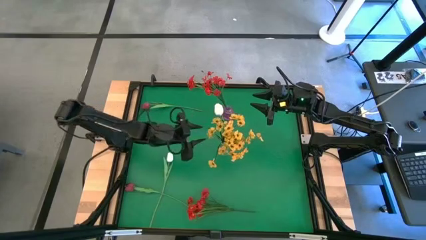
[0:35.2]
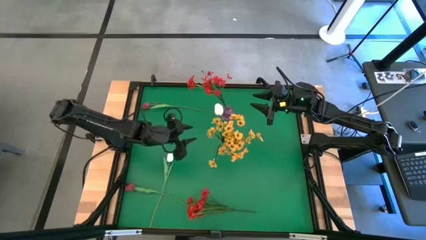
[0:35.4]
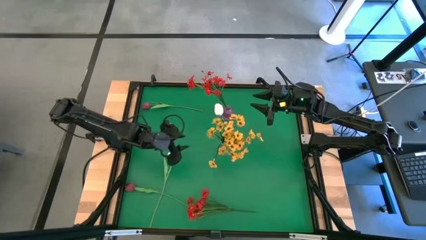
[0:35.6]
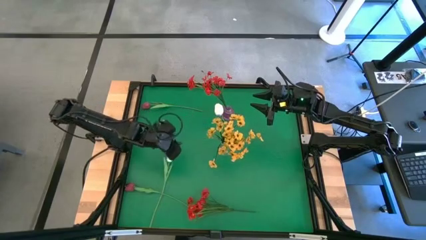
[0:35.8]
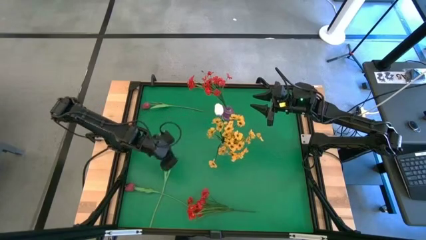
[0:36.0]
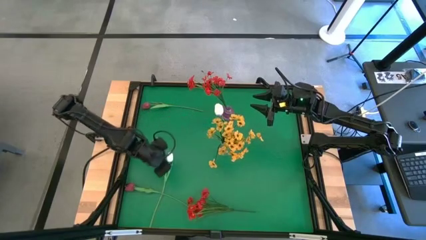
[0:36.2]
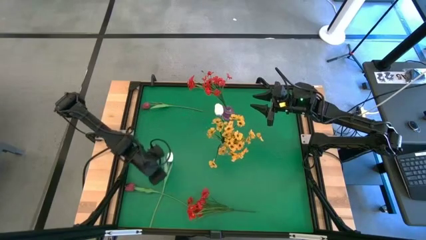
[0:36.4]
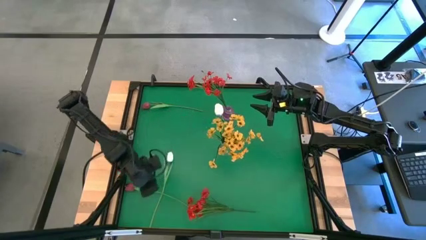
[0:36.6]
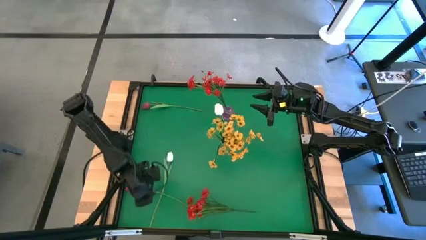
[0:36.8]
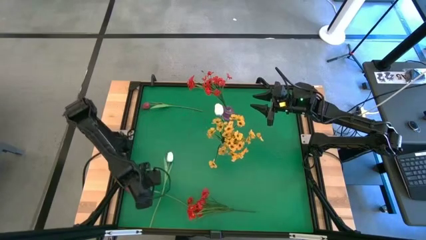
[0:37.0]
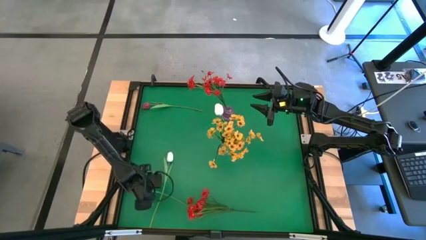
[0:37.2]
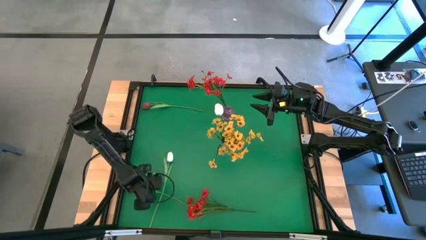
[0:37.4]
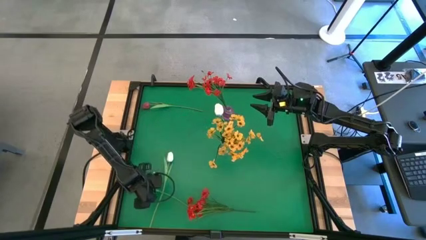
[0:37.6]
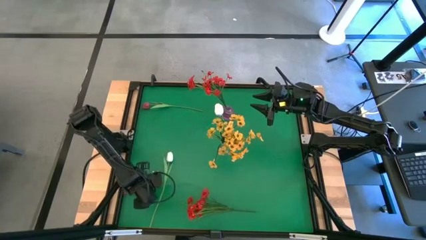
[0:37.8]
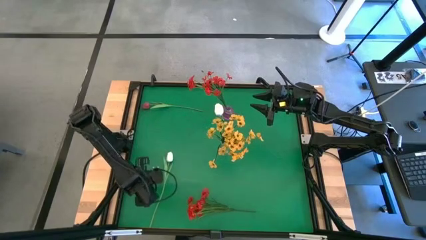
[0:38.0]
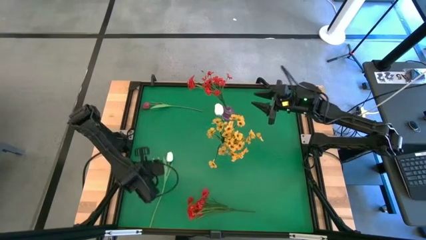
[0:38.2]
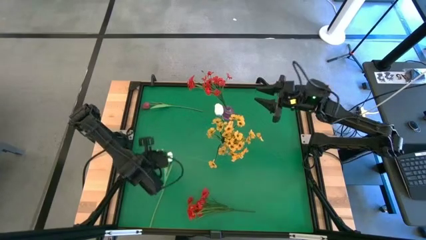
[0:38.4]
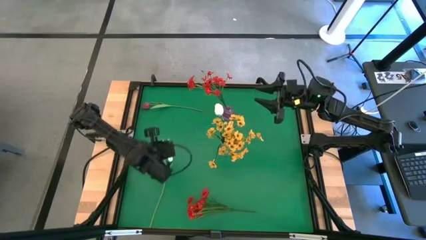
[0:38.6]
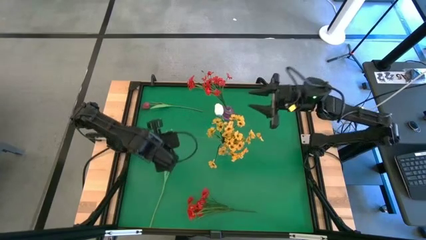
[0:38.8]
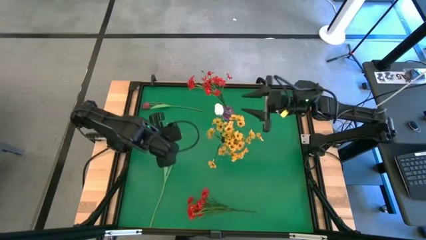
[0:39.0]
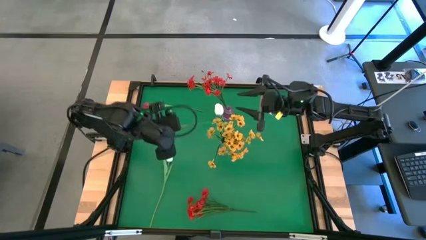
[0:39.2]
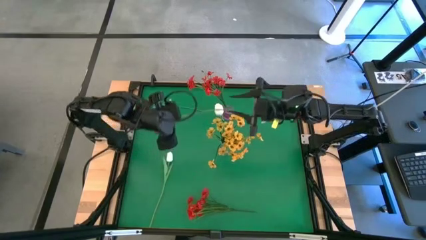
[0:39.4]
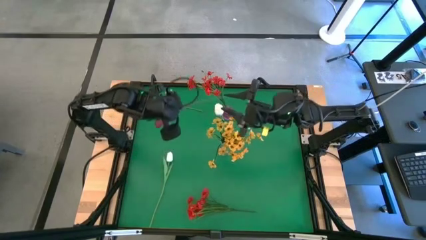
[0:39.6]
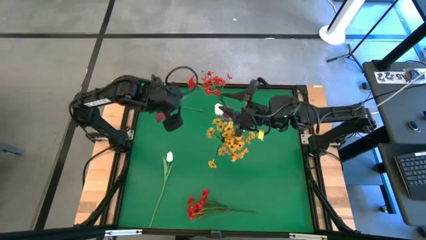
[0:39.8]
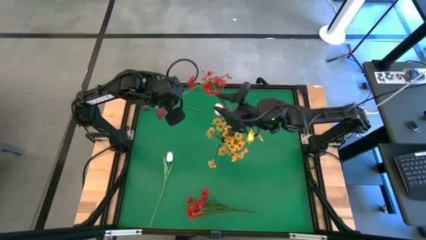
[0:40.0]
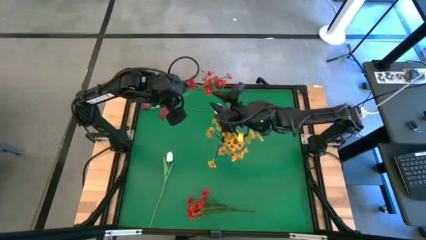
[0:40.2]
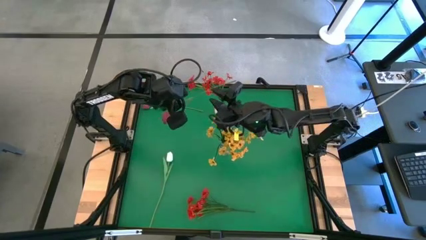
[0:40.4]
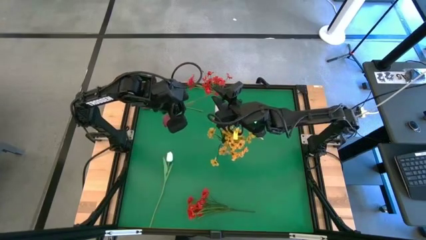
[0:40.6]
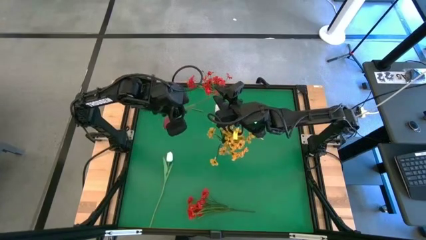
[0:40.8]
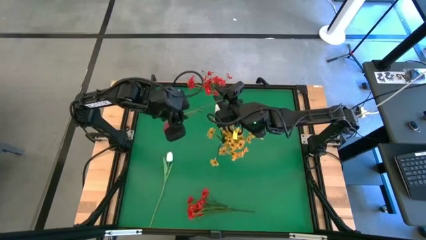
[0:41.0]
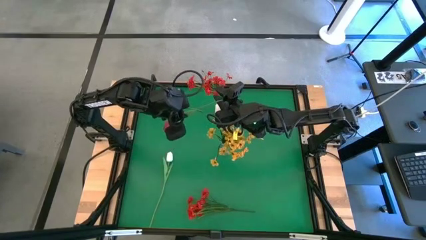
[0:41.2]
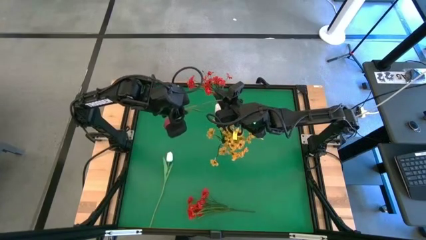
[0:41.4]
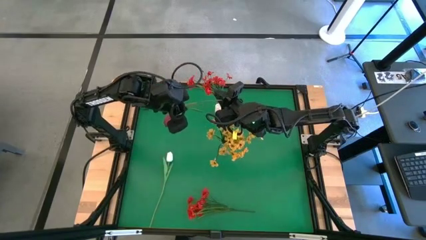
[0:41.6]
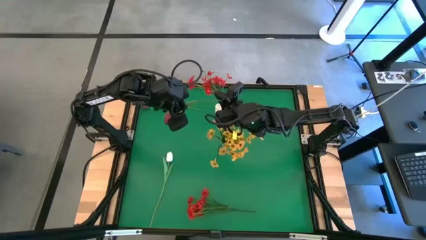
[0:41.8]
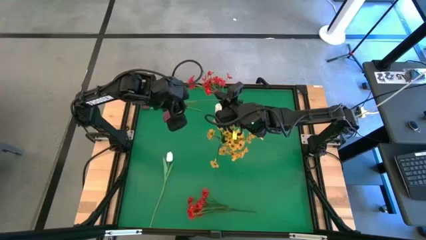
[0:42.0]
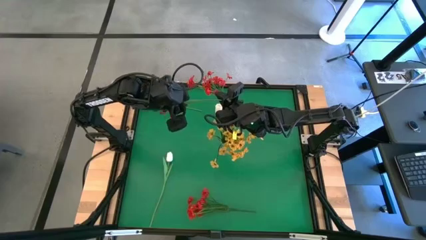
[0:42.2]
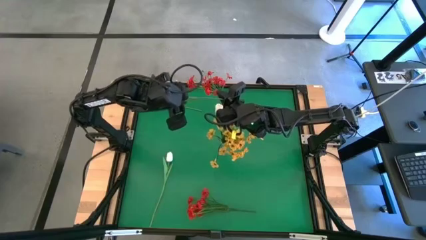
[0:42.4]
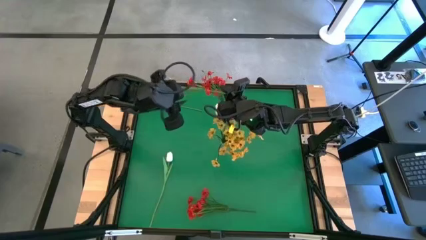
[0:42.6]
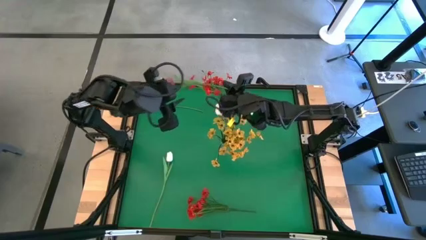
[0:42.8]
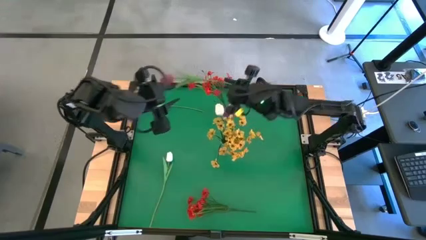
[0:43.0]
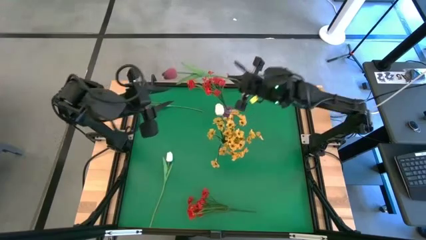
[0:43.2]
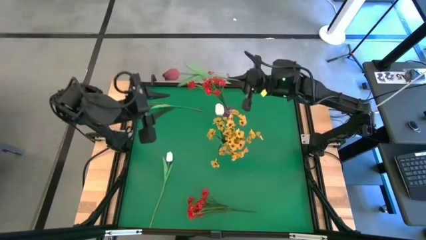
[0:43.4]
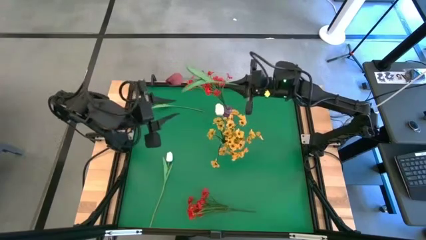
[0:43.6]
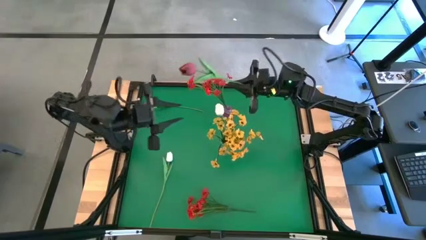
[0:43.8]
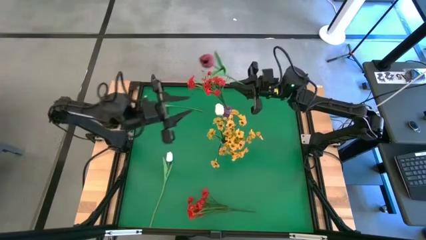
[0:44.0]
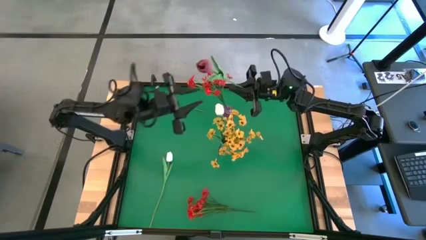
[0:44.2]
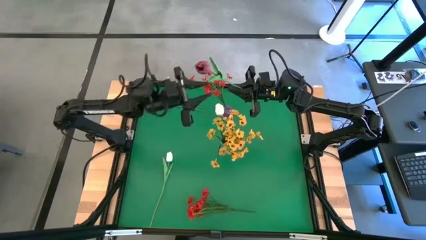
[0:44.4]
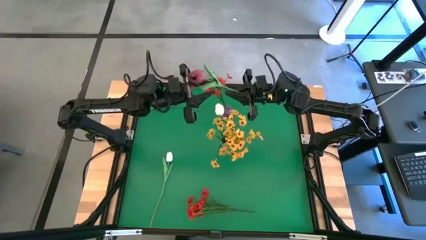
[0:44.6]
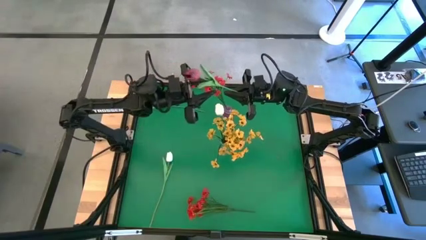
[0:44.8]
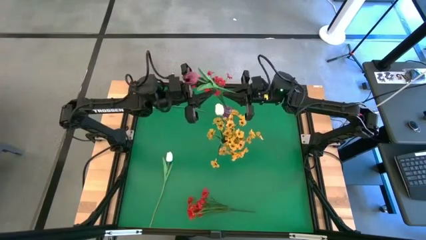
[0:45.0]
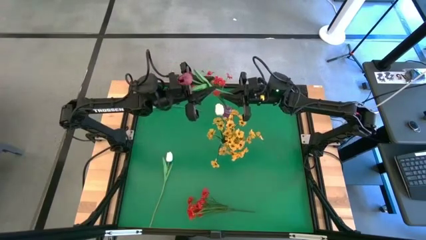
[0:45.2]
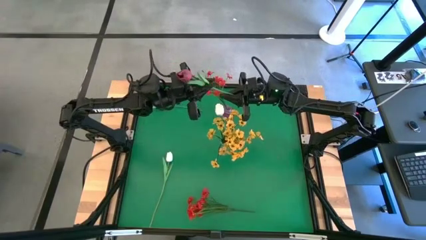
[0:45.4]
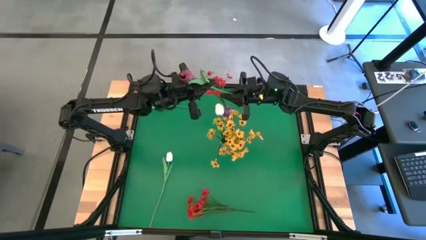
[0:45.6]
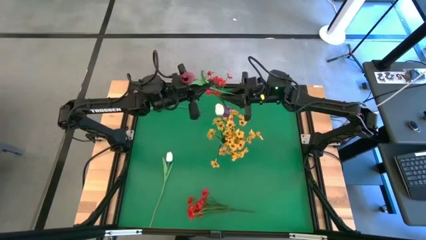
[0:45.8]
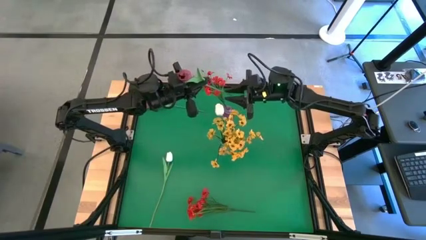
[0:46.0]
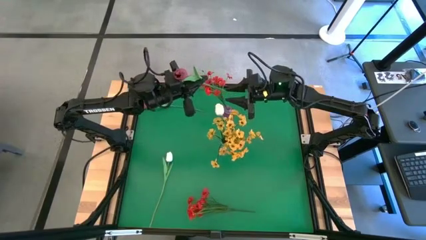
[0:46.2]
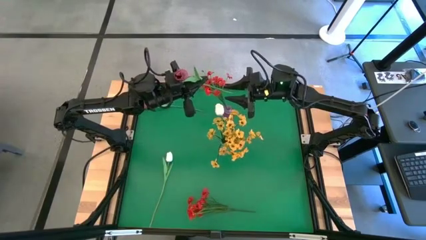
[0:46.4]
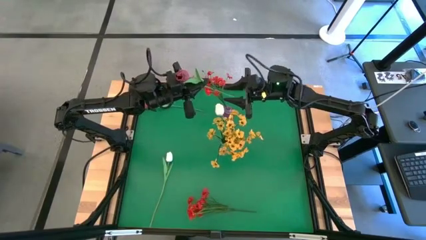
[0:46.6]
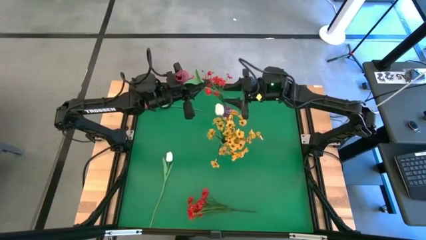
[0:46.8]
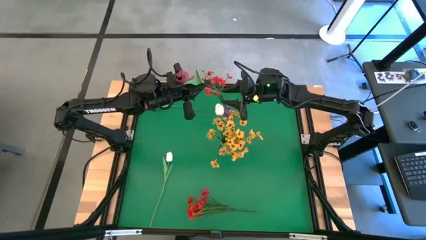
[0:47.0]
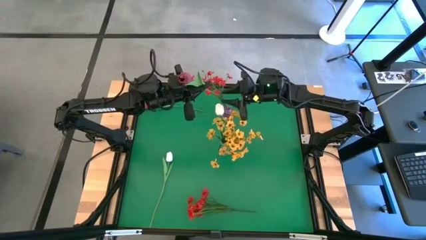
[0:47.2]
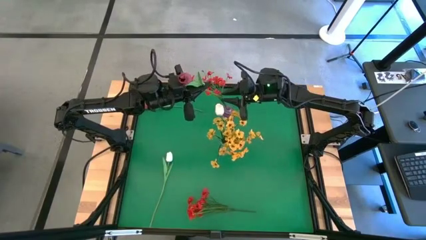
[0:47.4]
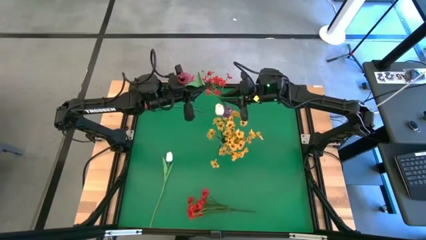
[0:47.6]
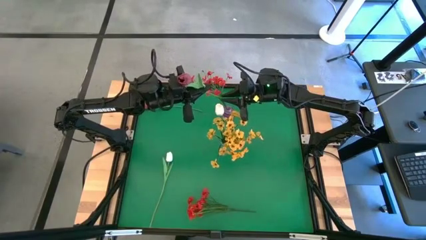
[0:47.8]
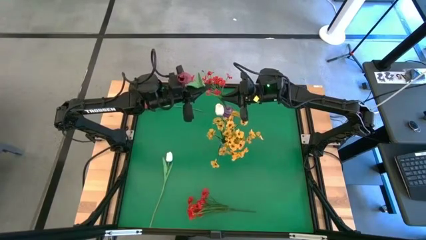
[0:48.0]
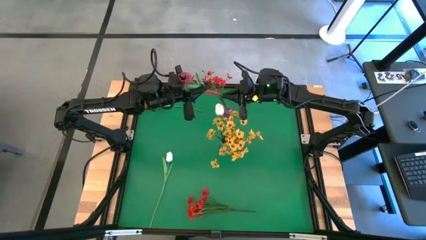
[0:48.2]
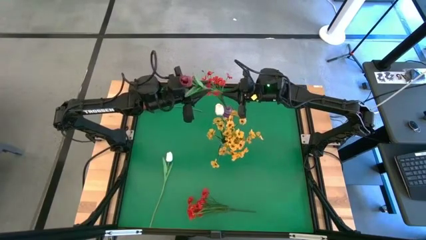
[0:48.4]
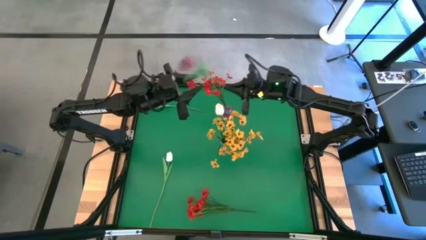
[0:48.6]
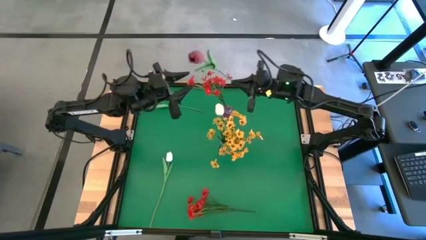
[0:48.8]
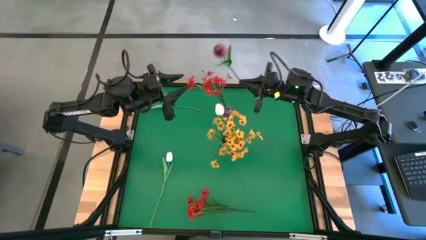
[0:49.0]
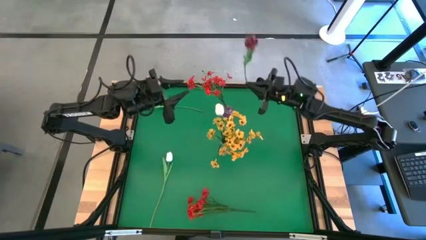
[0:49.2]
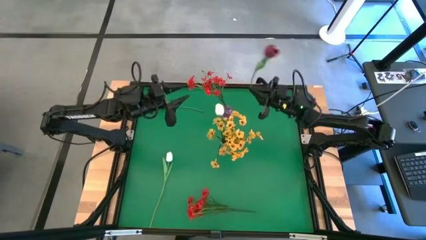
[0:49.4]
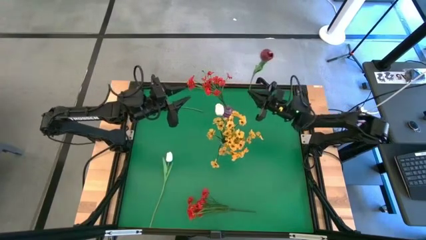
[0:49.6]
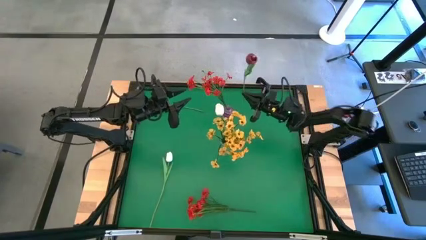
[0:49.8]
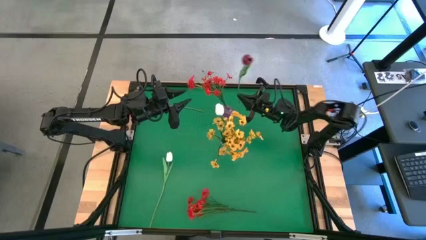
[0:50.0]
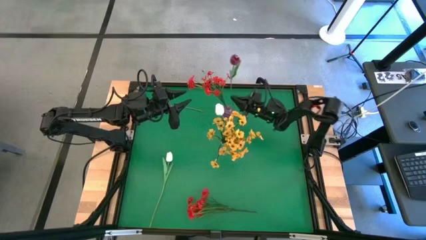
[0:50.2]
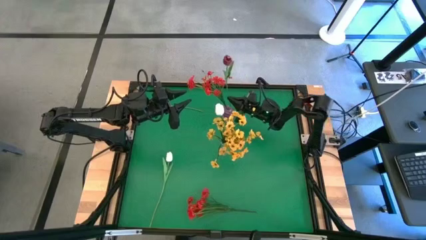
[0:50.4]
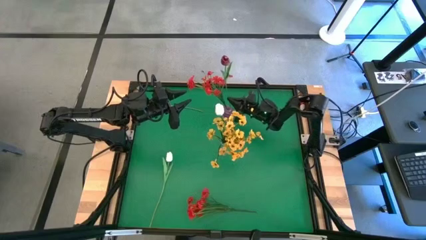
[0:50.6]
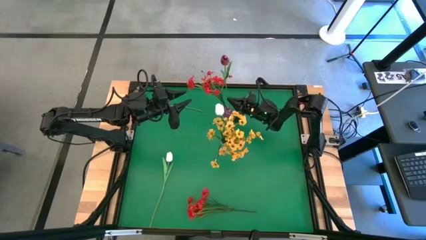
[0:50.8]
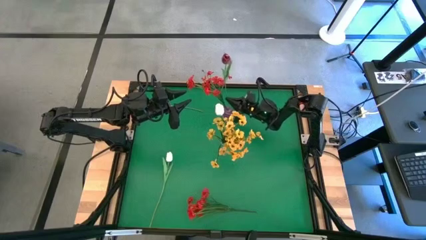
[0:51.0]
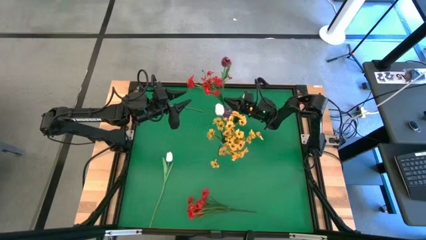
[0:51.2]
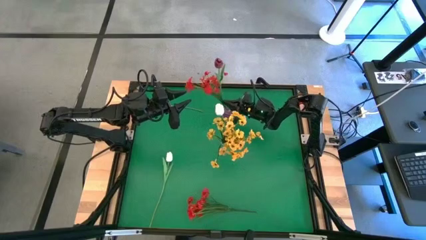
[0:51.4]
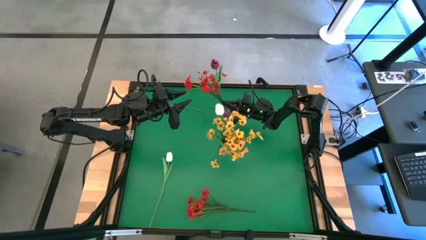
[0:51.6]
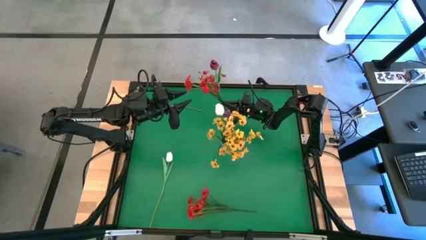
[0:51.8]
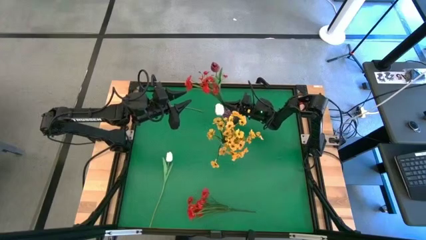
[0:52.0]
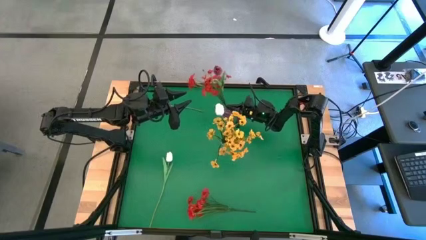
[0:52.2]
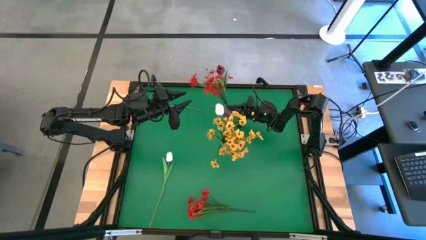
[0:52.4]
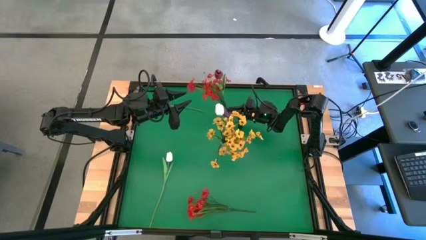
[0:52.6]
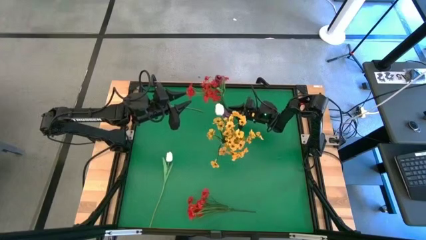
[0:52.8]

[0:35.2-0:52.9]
Task: Sort flowers into vase by color
Put the bottom red tulip into the violet vase
